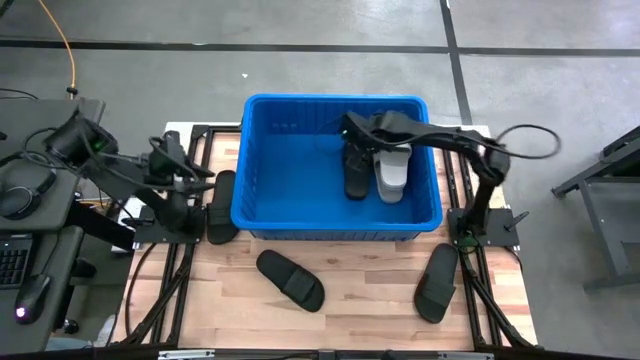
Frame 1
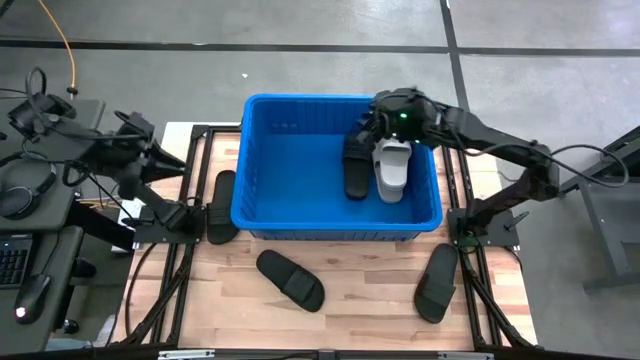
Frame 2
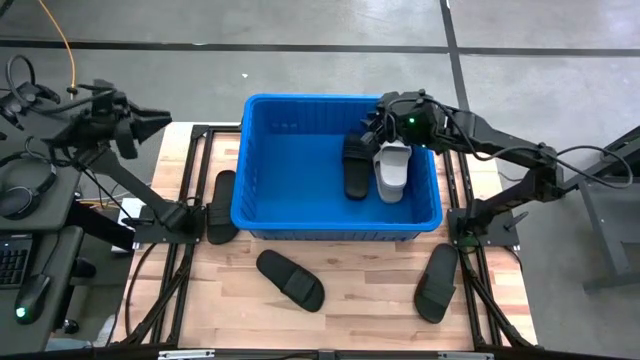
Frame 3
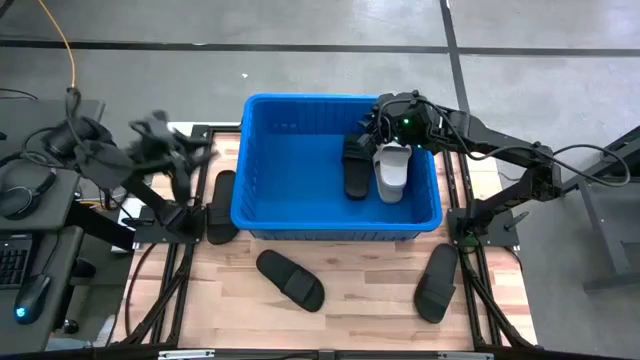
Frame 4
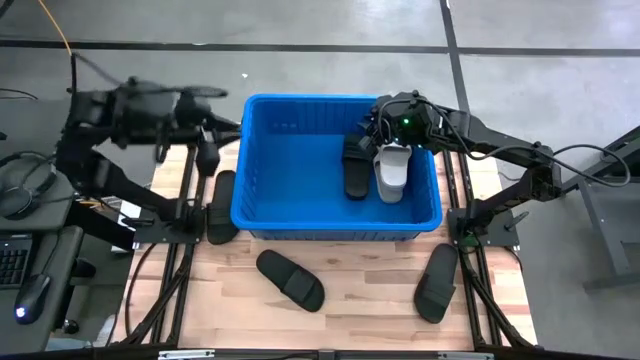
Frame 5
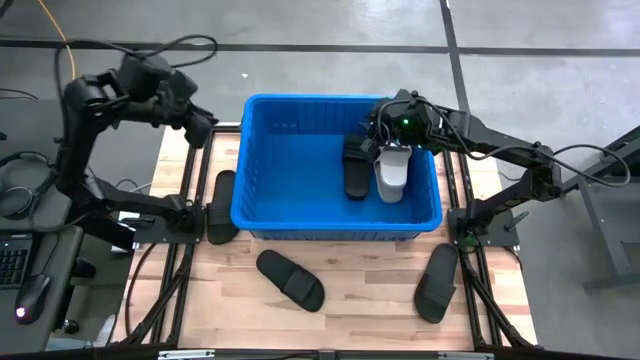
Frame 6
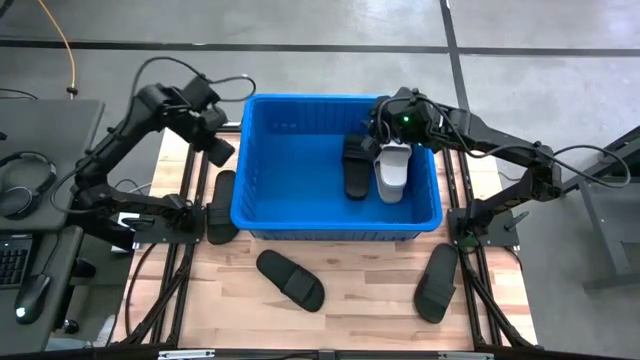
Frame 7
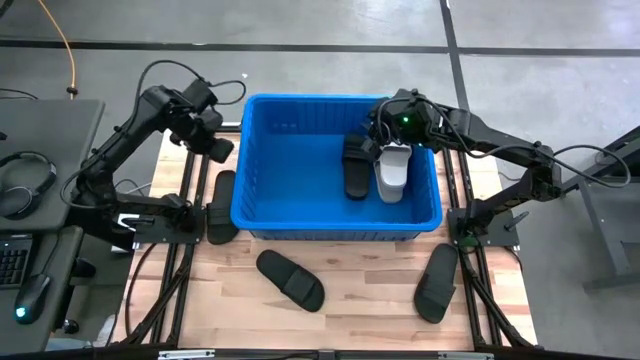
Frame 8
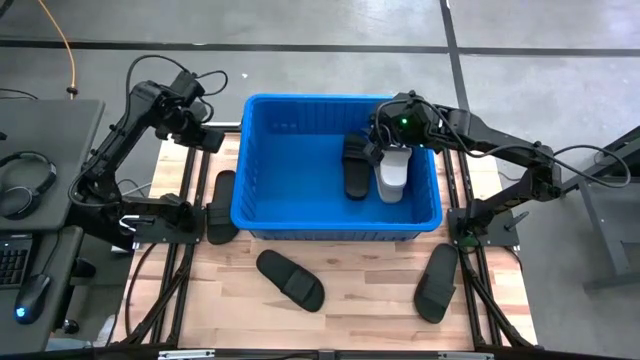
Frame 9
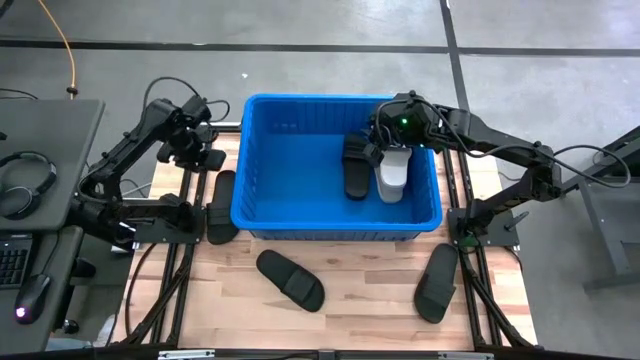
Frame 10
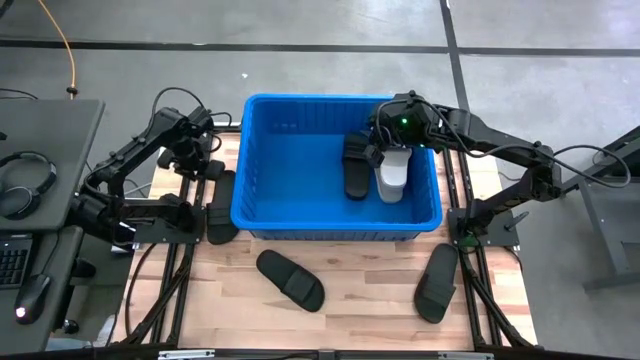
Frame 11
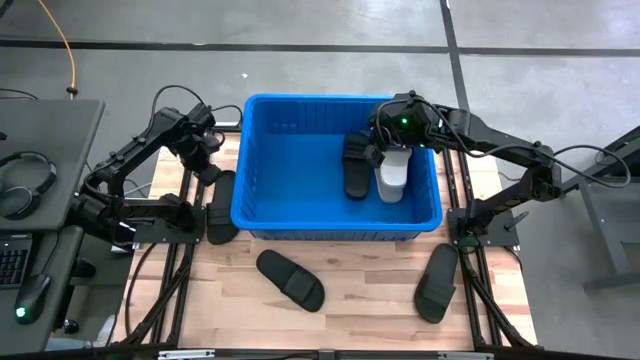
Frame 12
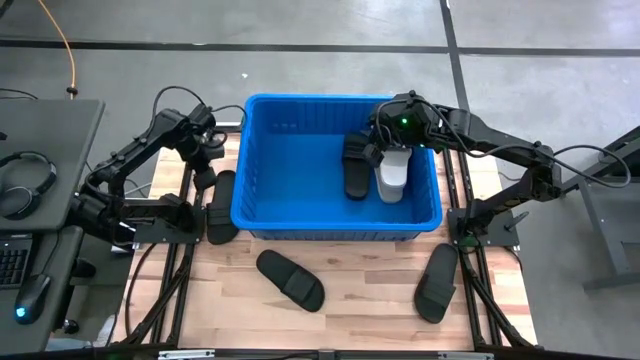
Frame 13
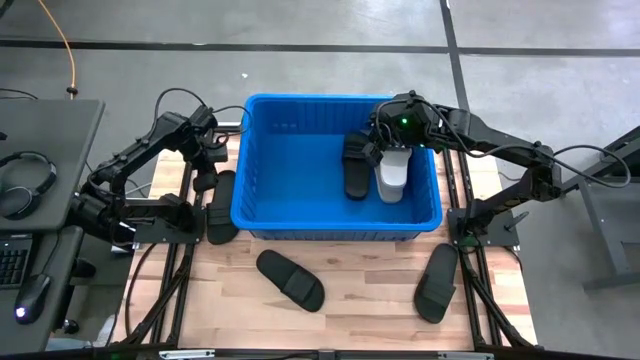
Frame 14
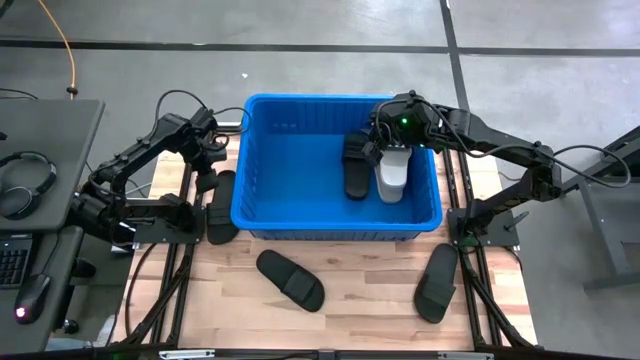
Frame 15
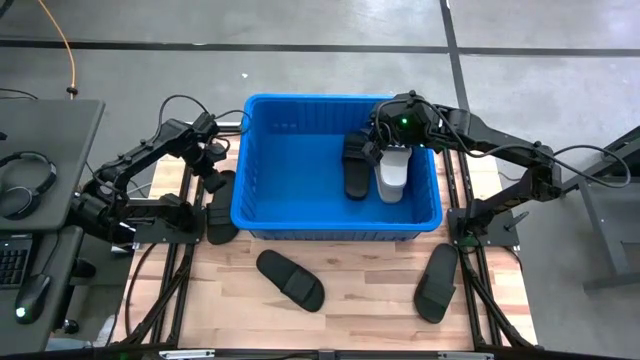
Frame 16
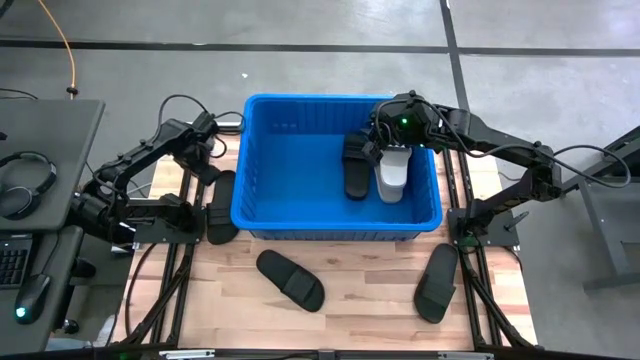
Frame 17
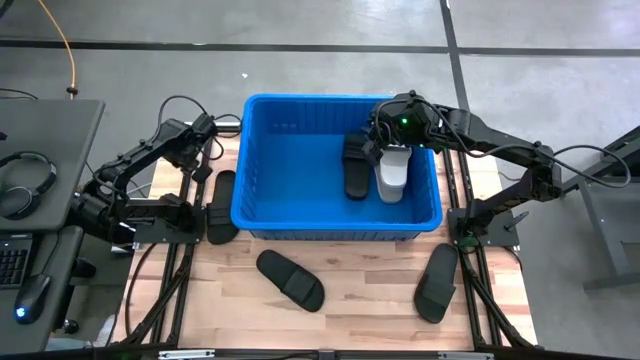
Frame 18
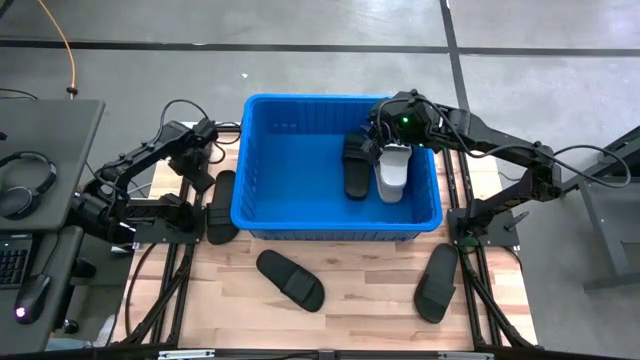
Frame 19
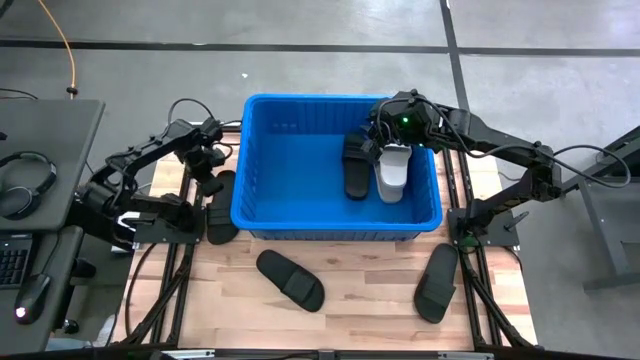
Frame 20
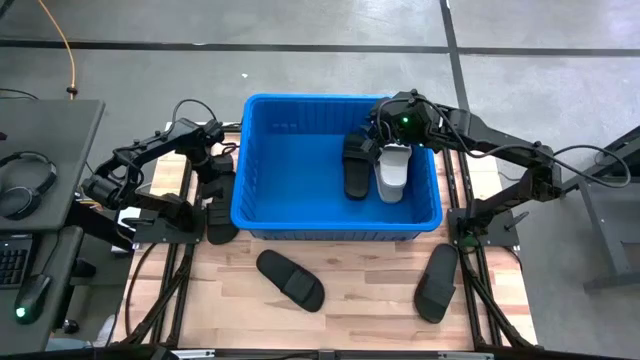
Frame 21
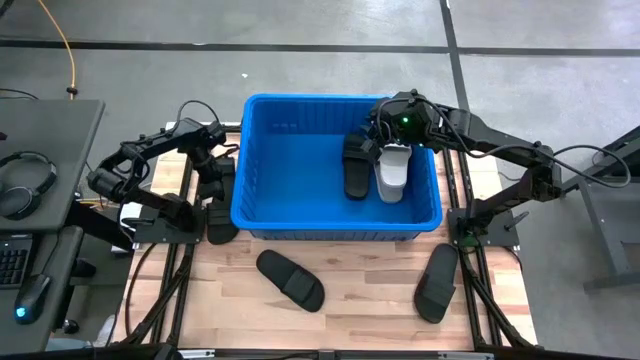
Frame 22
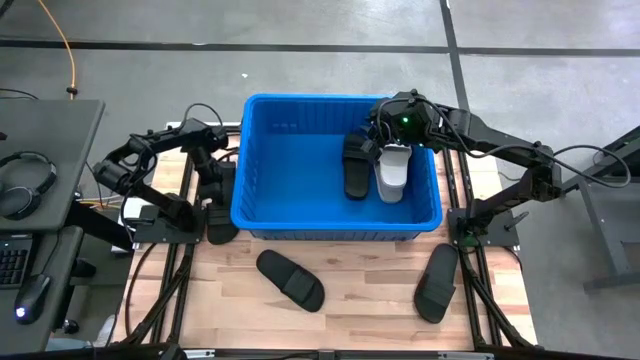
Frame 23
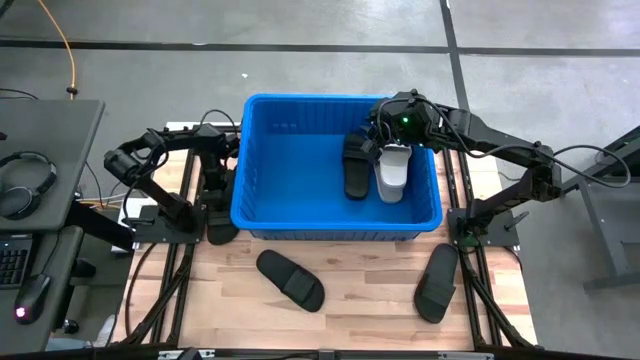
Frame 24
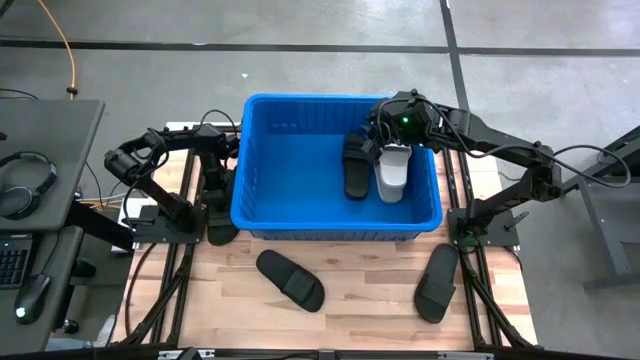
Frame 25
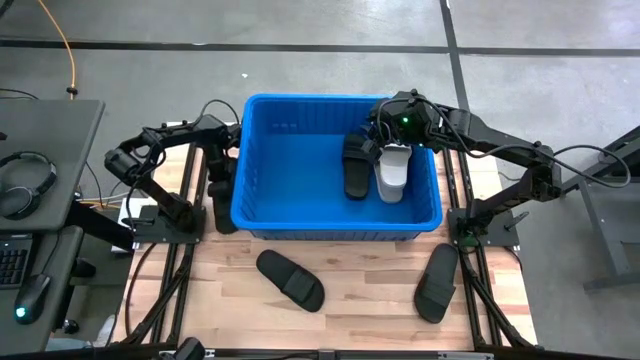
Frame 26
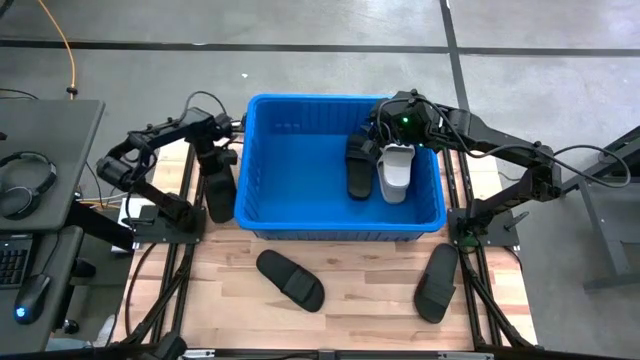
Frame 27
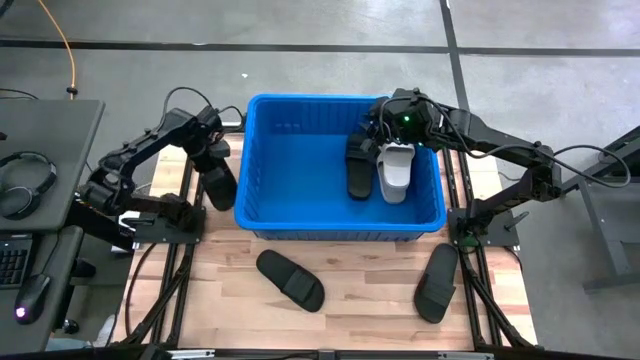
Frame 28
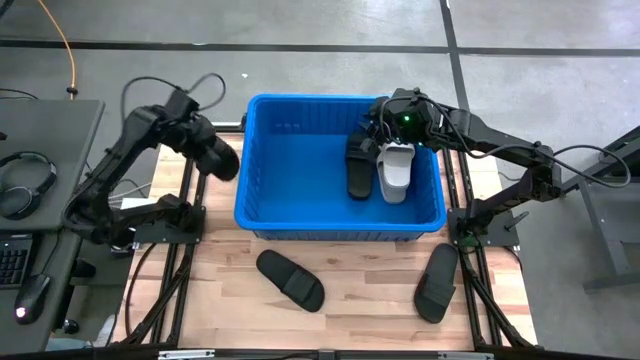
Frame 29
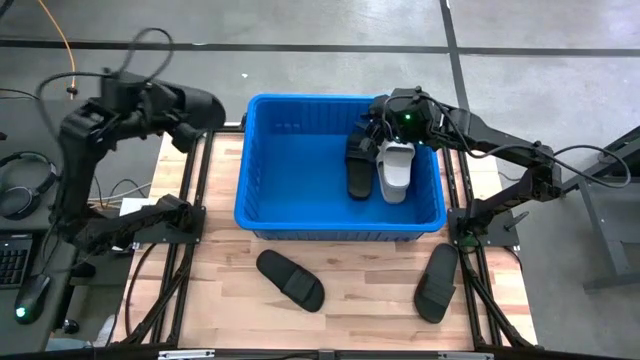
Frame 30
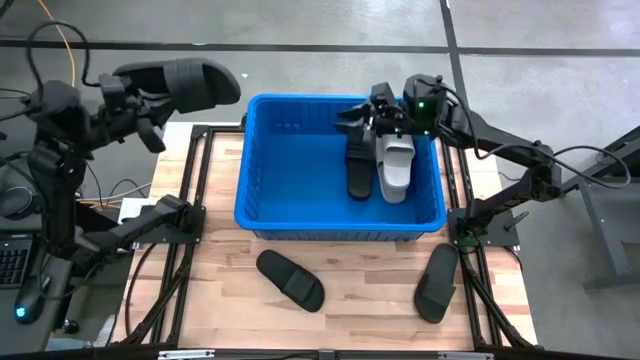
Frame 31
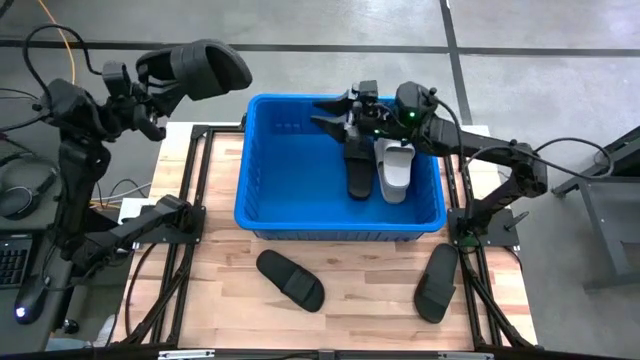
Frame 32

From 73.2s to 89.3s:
Task: Pick and place slides into bin
Put the left black slide into the blue bin

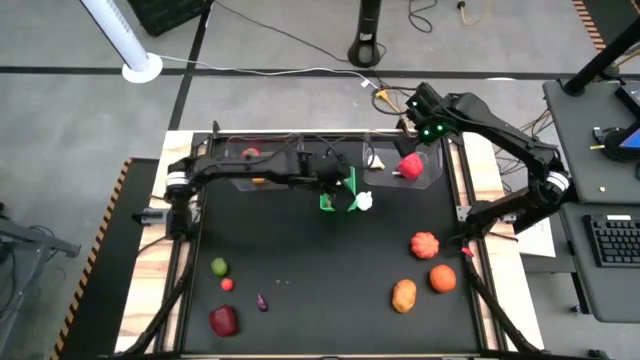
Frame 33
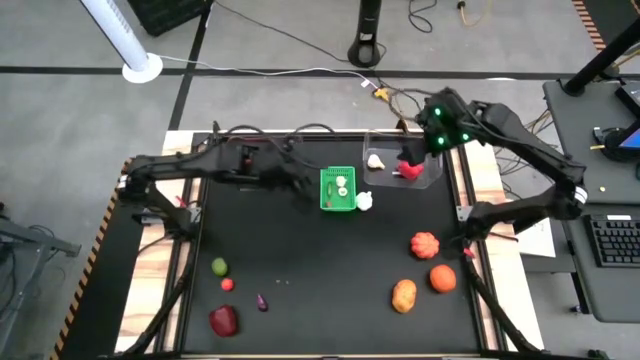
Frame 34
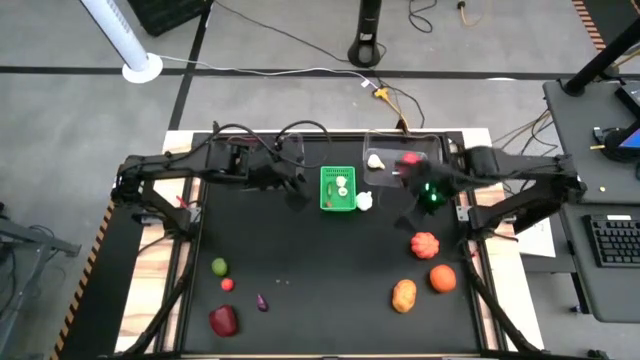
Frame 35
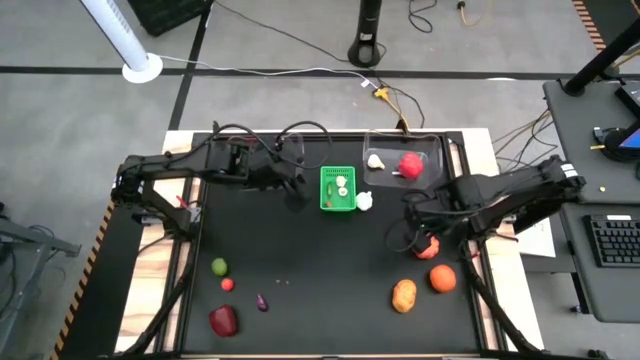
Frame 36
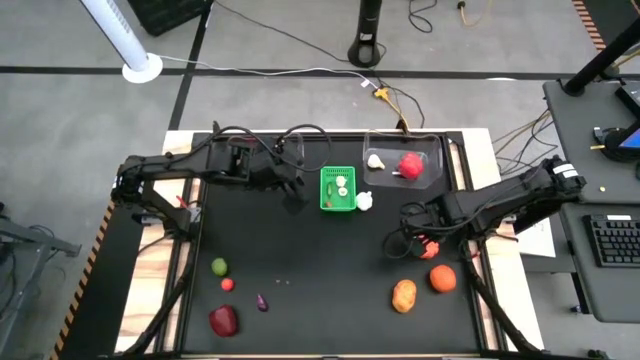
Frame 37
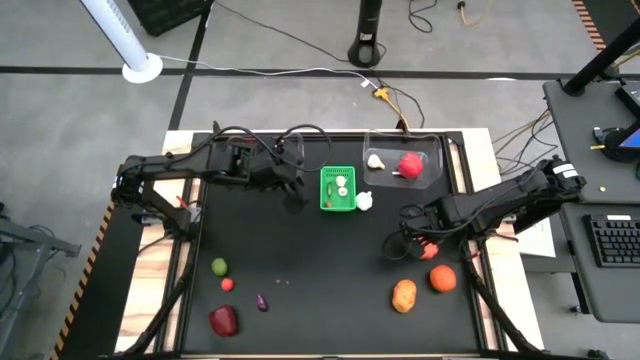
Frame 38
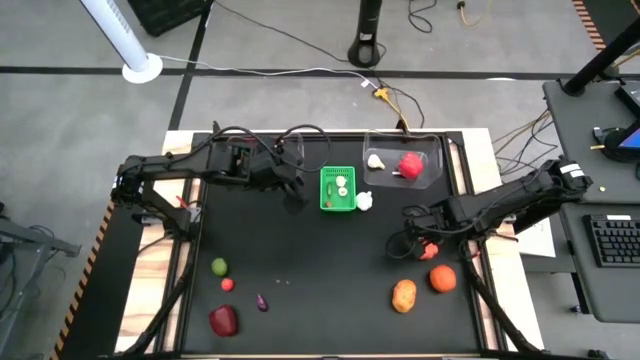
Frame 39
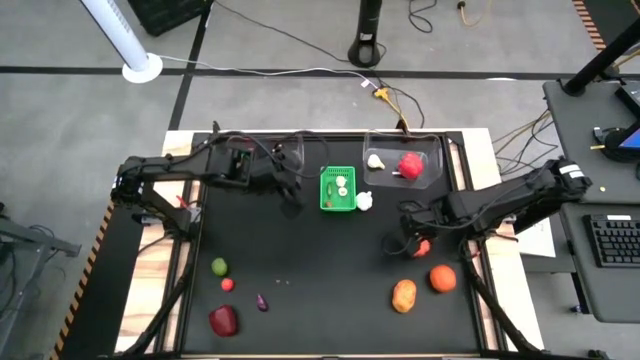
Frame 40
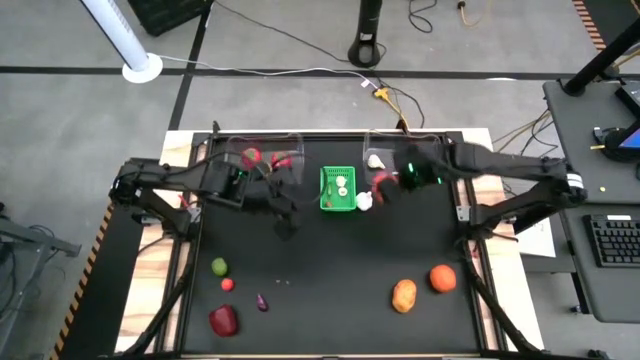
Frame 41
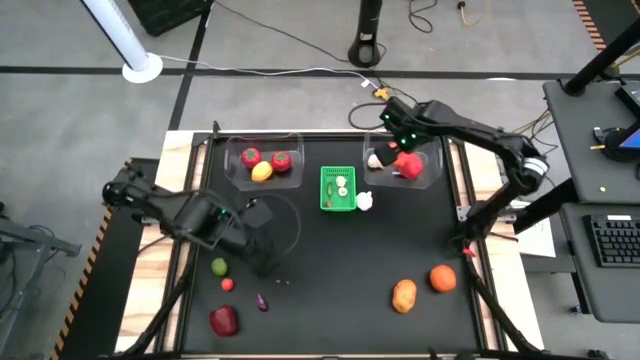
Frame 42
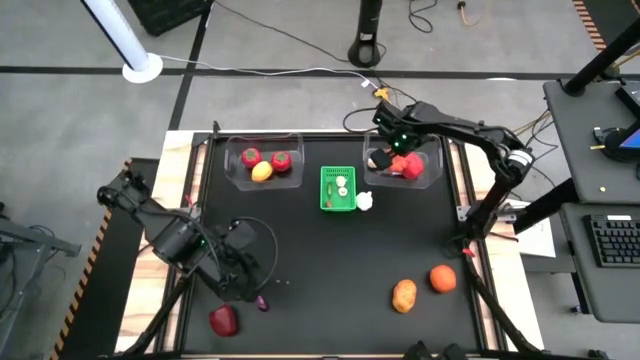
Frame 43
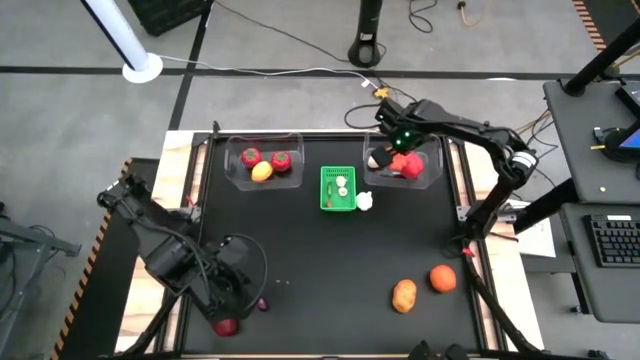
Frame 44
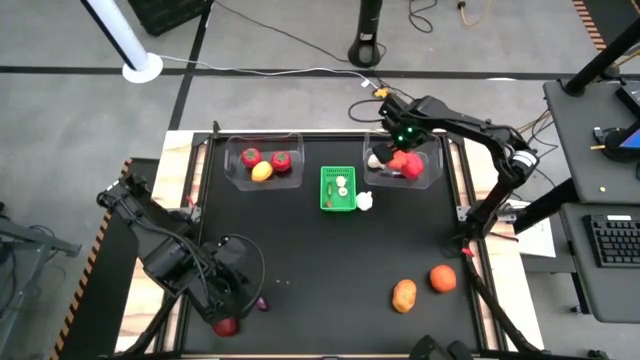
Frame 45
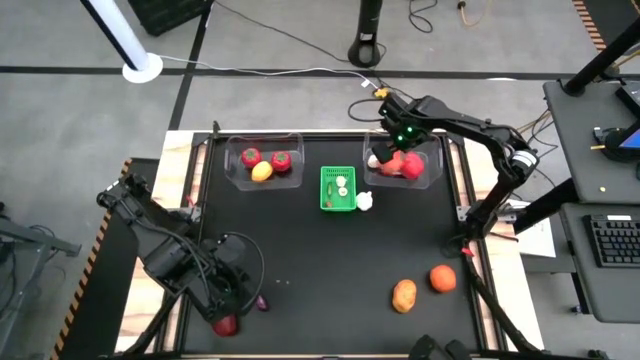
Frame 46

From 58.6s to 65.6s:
Task: Sort produce into baskets
Put the pumpkin into the right transparent bin
